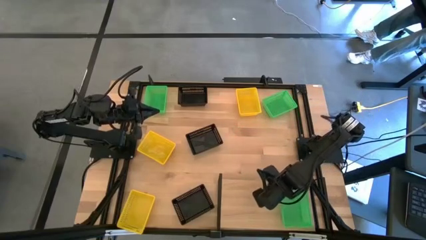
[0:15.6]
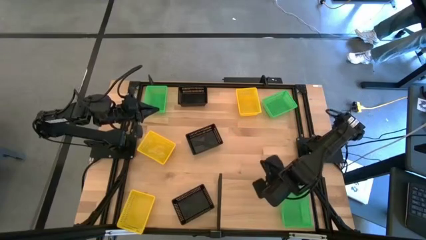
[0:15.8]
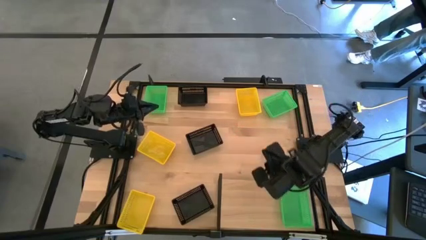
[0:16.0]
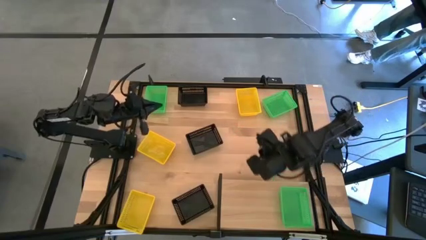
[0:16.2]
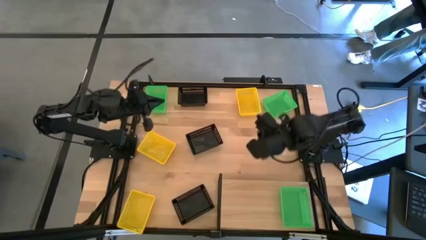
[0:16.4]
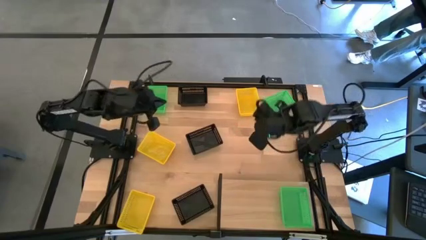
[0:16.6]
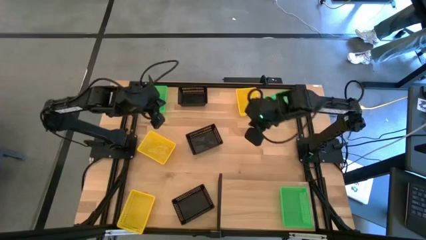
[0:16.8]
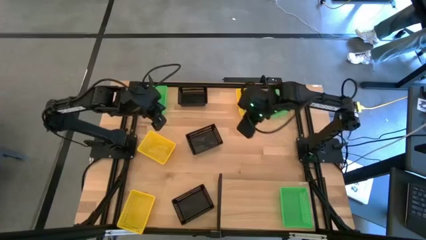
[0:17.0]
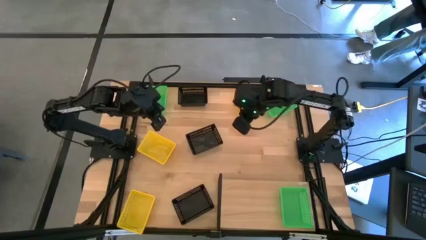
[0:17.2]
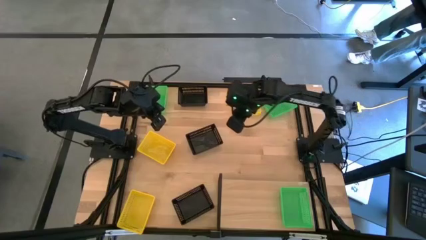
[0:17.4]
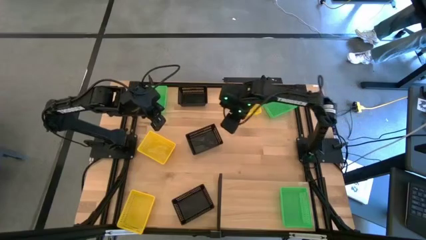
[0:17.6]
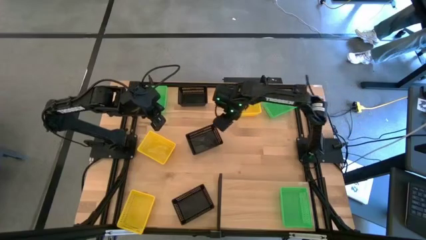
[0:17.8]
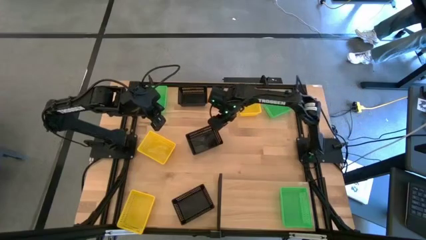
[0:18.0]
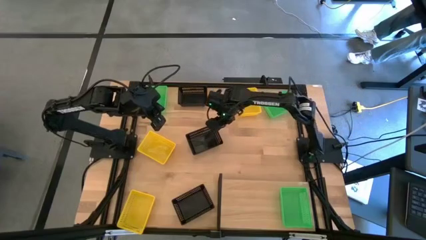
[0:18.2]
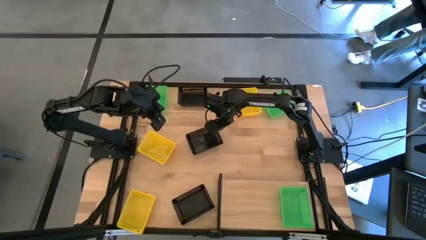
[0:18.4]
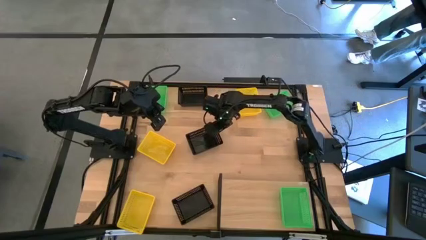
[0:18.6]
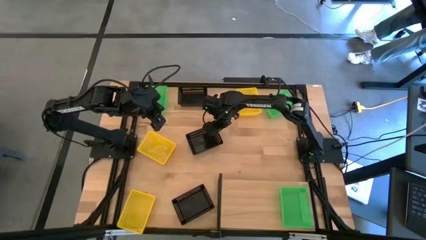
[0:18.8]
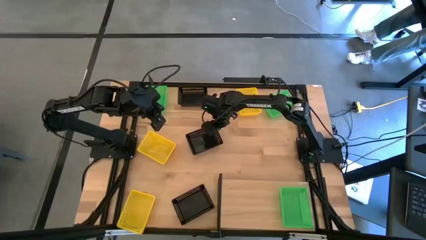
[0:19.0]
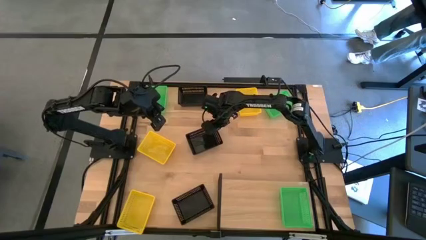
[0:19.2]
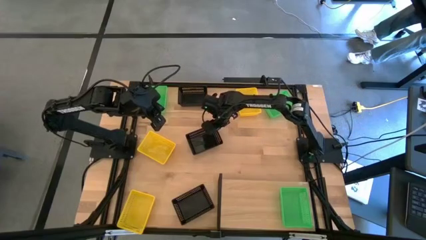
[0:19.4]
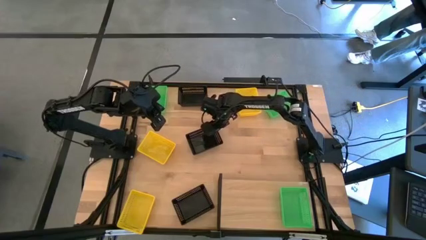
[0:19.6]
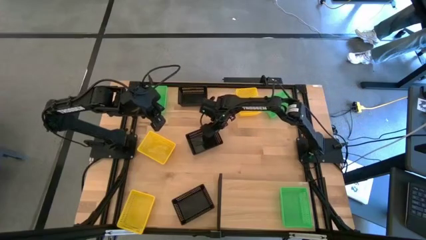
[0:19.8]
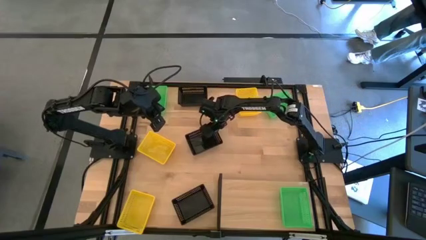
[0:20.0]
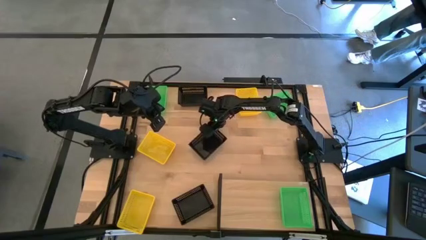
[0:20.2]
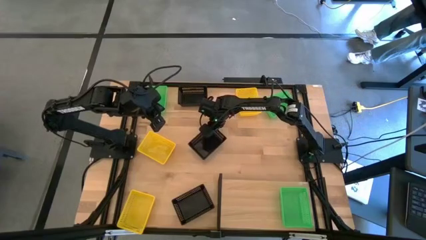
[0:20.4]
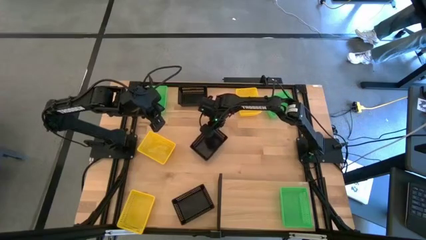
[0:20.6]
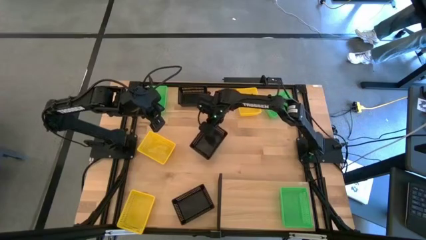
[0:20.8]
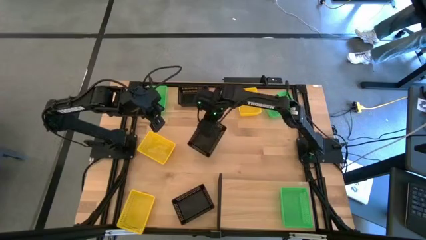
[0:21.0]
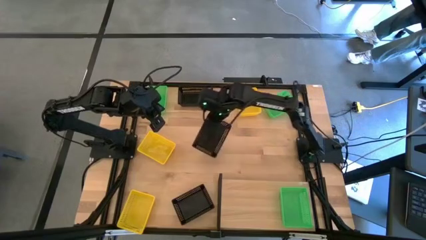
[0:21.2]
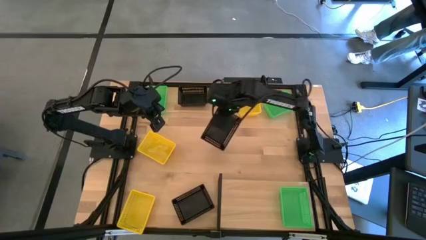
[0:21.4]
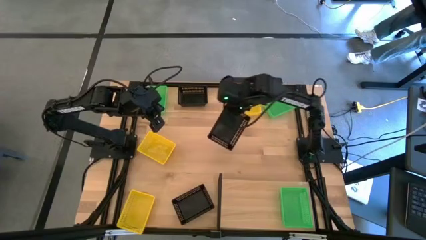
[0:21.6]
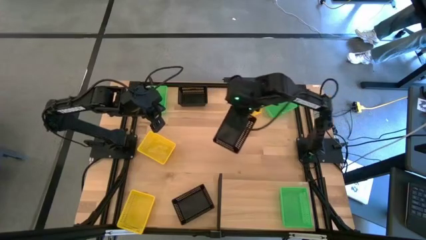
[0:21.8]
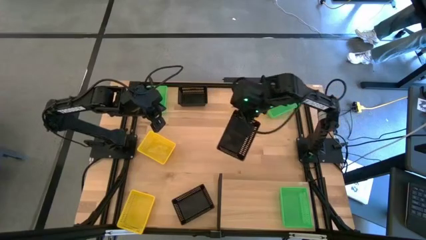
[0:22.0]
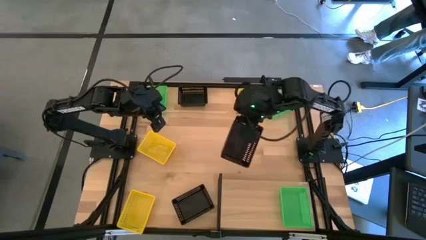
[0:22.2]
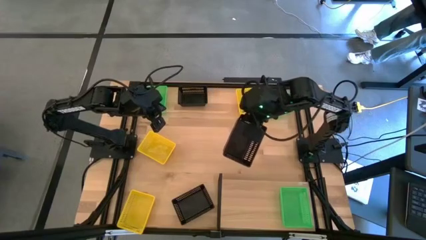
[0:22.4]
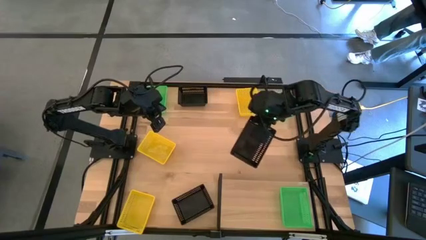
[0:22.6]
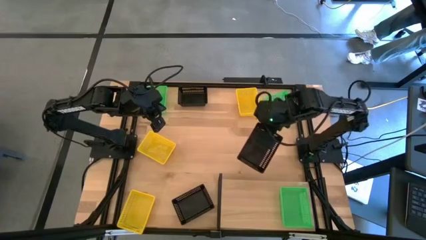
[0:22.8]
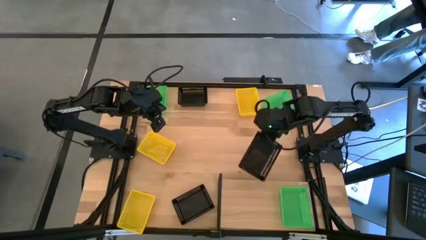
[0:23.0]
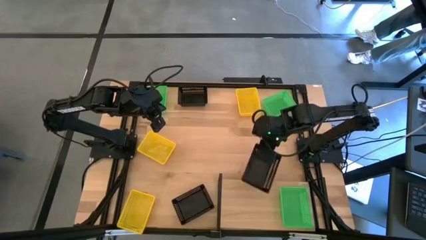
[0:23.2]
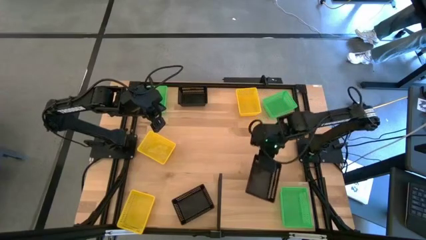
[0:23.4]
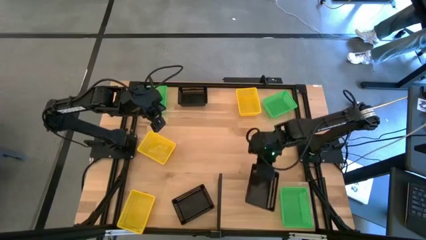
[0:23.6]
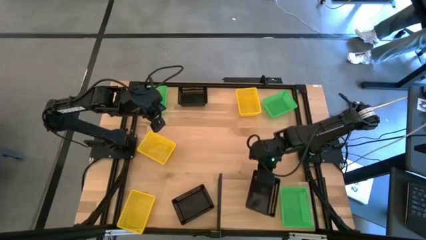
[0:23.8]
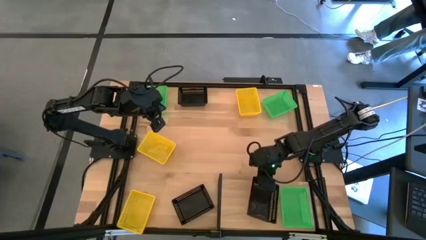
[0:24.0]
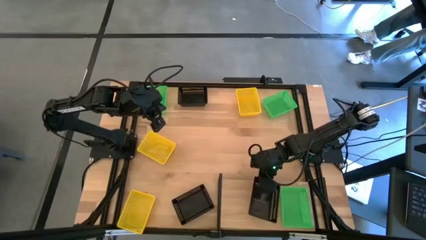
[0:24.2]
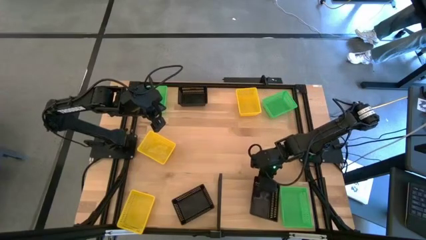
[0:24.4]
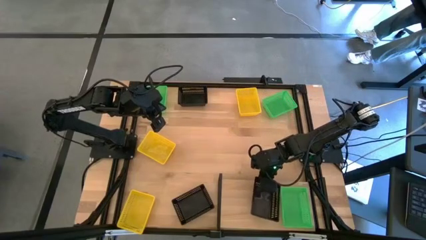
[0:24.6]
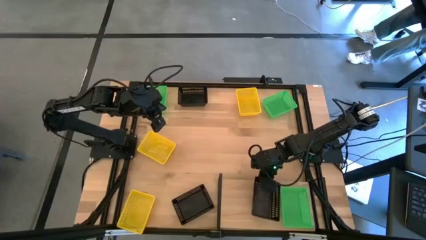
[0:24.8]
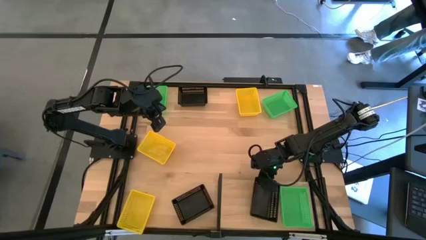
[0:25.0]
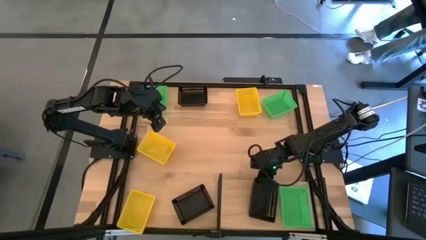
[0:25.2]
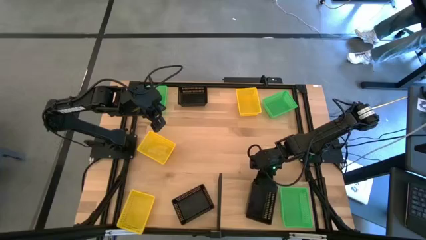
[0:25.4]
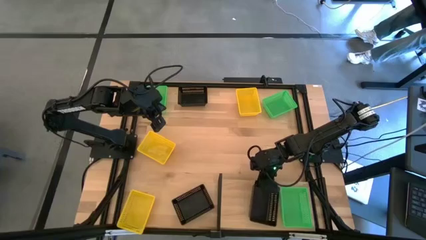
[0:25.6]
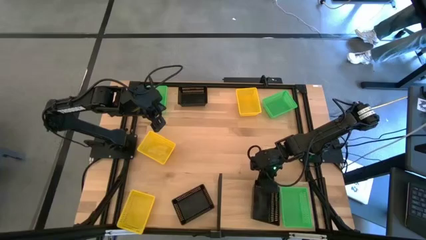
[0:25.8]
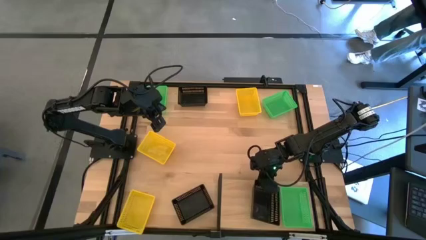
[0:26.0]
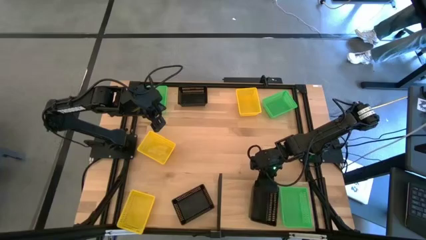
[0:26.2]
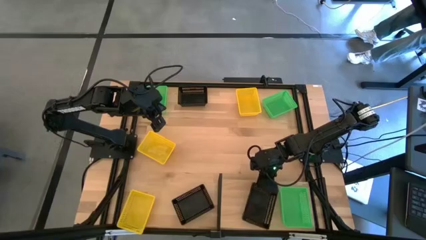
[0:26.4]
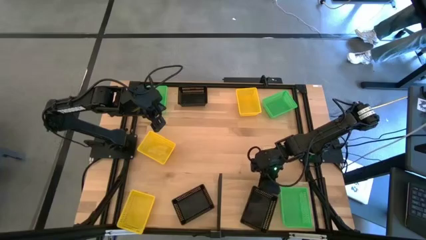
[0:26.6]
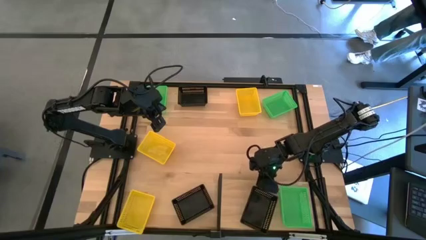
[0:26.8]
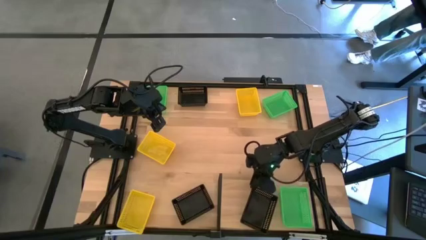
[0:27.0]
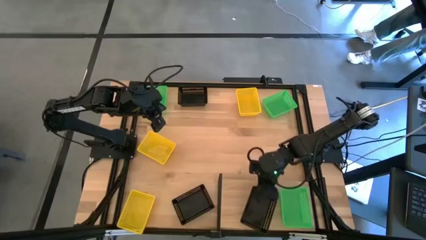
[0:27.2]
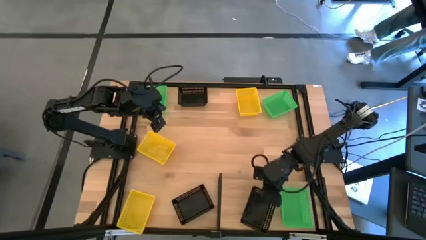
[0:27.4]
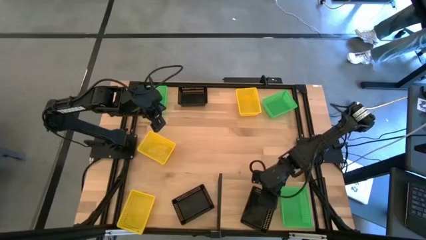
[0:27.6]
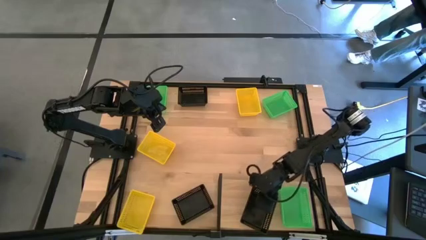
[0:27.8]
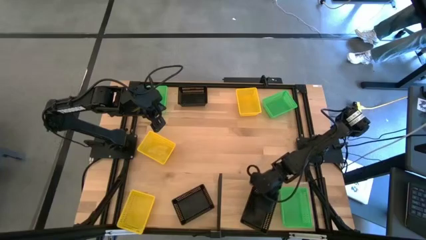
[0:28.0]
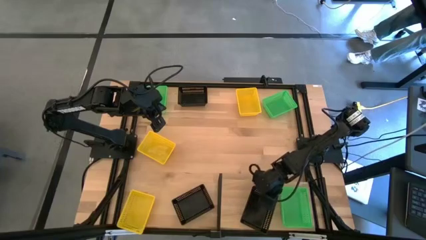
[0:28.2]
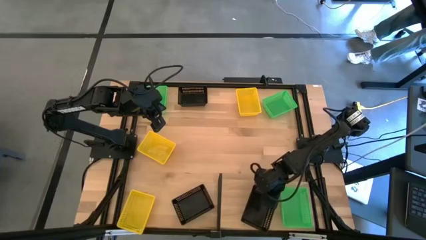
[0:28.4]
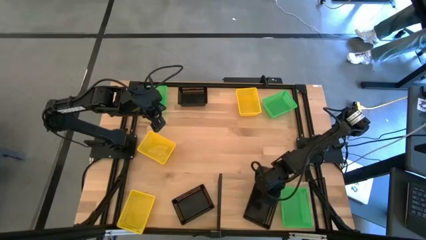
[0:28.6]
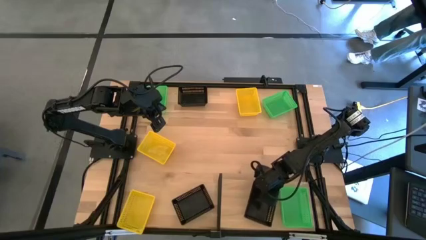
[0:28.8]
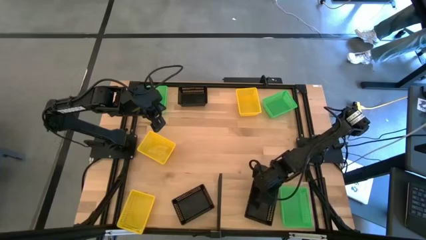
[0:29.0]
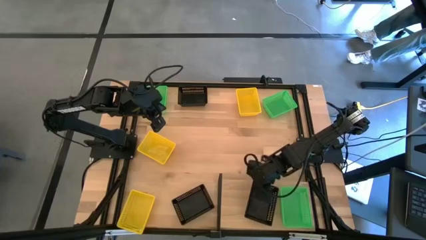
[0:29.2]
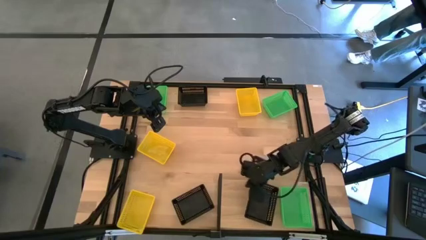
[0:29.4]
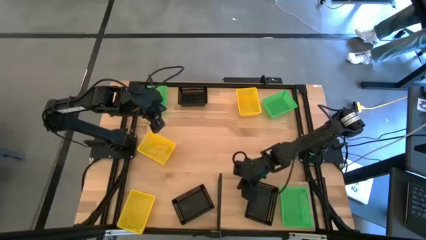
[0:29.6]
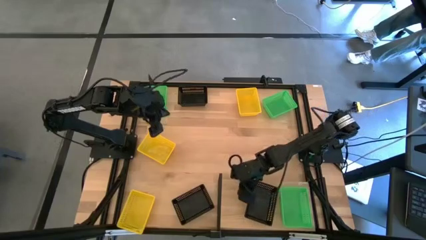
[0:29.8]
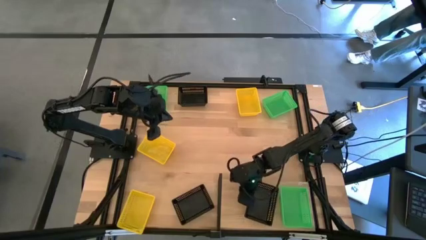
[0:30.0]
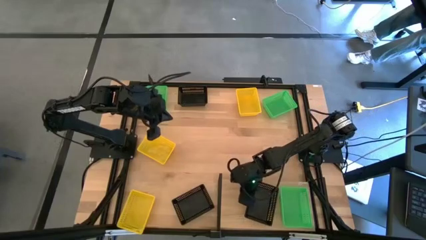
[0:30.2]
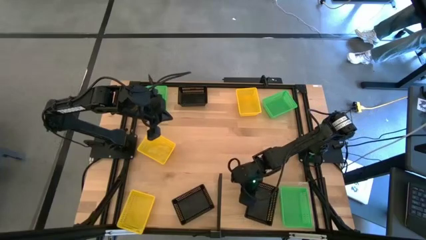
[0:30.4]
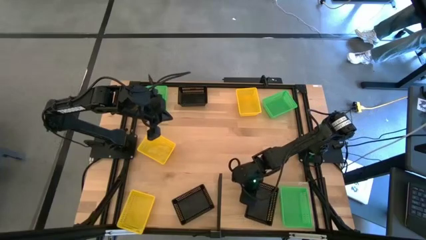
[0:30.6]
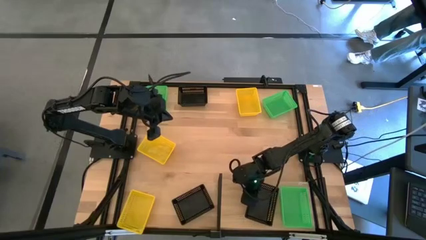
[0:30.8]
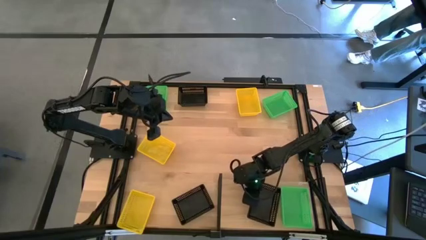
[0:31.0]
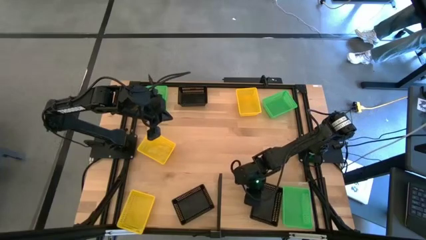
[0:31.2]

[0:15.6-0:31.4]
Task: Stack baskets on shelf by color
Put the middle black bin on the shelf

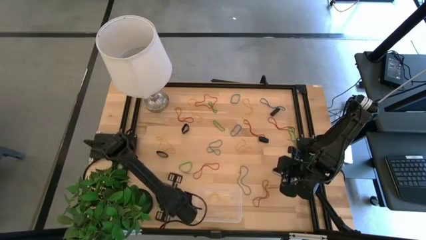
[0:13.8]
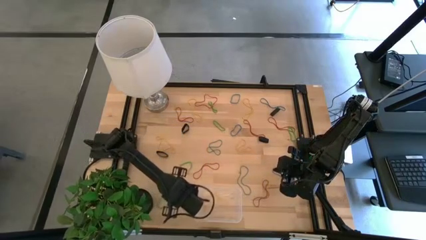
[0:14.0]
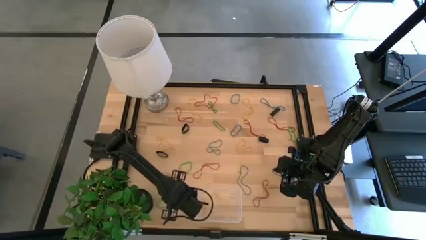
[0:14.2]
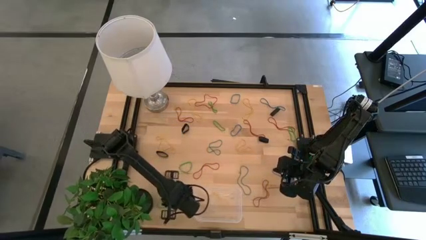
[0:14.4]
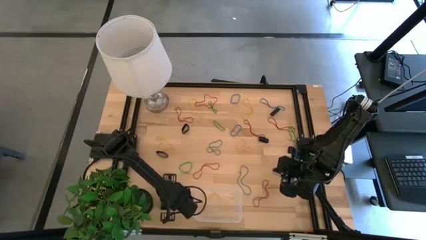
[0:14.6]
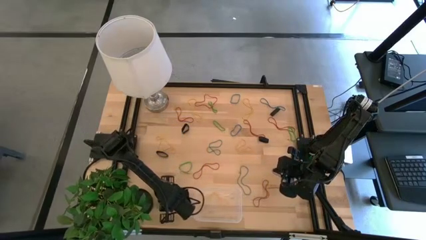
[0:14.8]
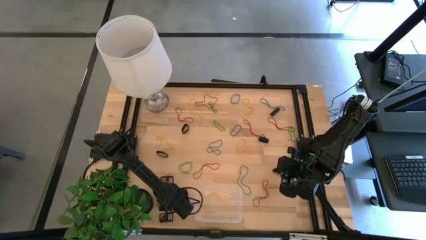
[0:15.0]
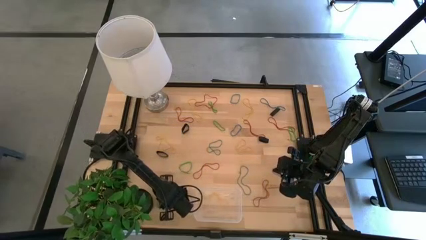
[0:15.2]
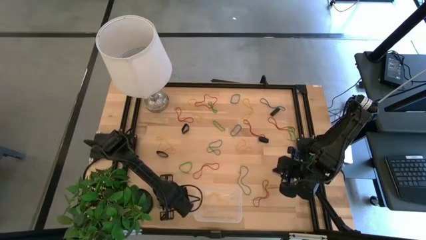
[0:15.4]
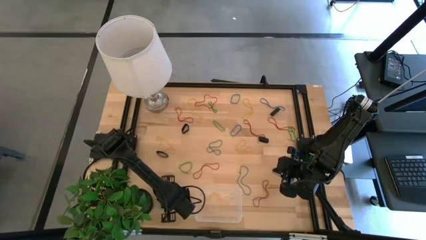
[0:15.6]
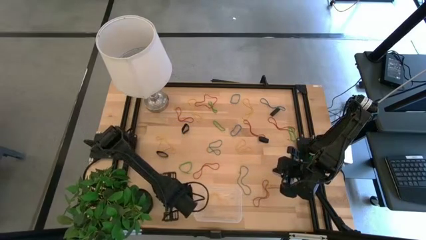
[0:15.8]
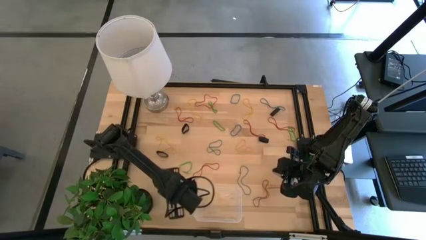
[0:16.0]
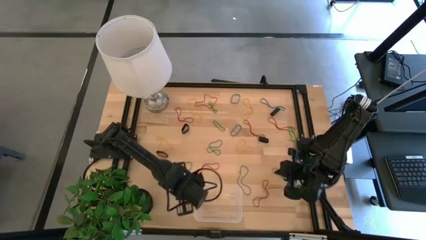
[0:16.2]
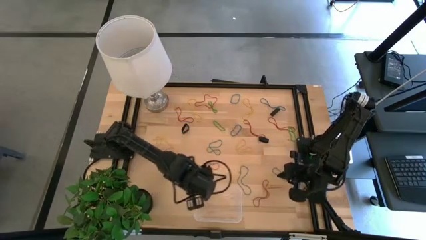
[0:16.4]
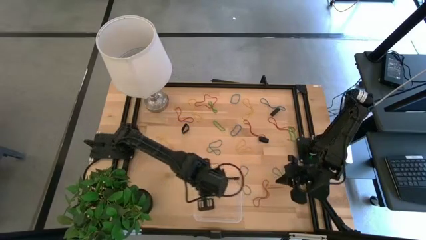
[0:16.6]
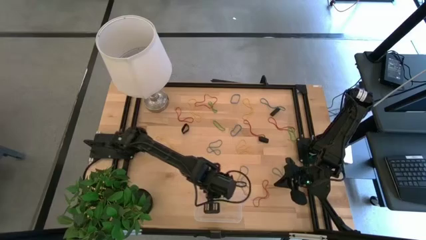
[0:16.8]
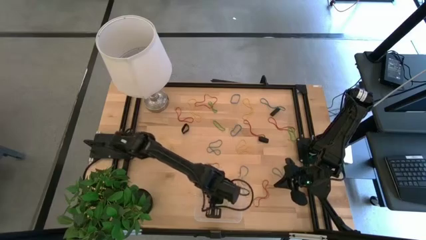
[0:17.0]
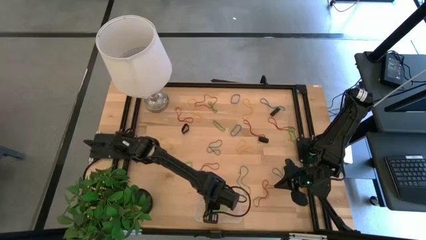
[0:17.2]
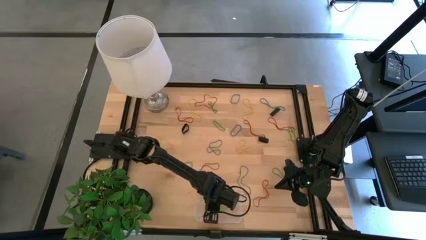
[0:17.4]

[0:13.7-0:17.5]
Task: Pick and place rubber bands into bin
Put the green rubber band into the transparent bin
